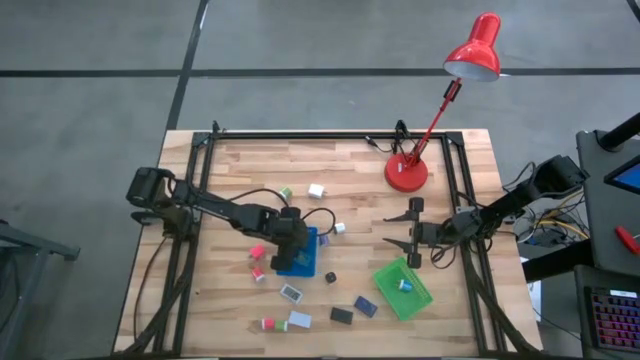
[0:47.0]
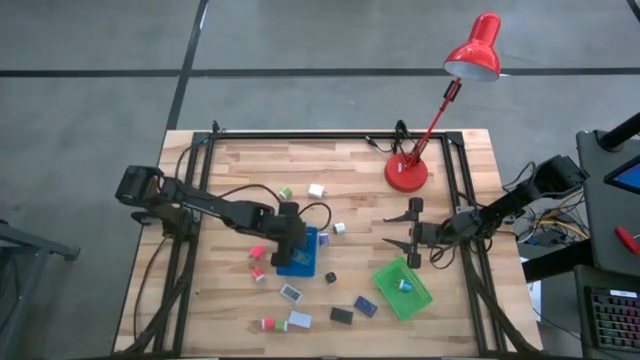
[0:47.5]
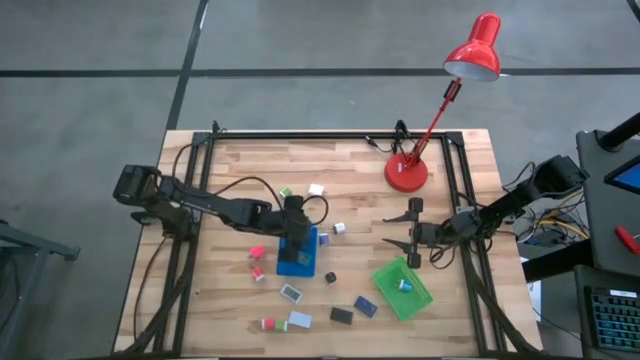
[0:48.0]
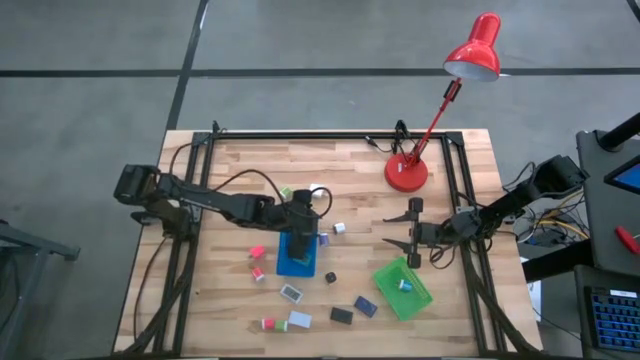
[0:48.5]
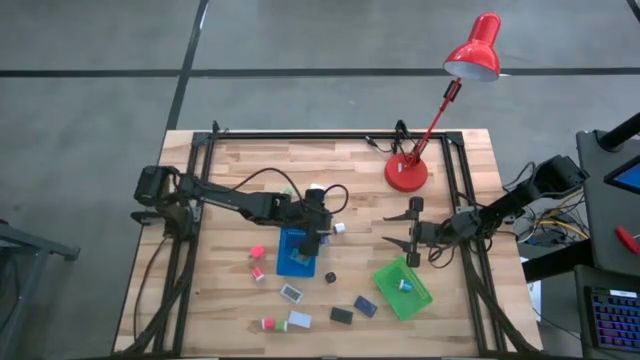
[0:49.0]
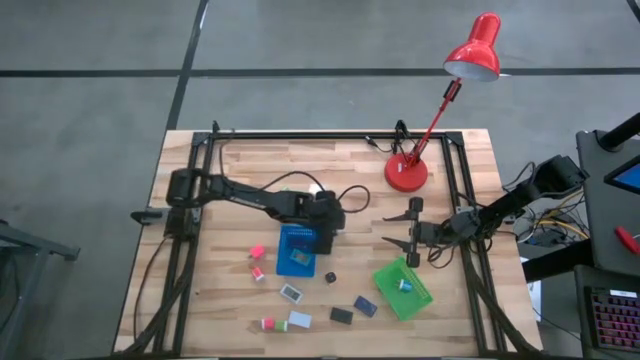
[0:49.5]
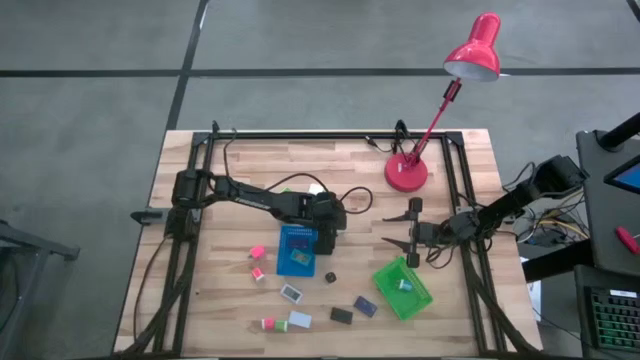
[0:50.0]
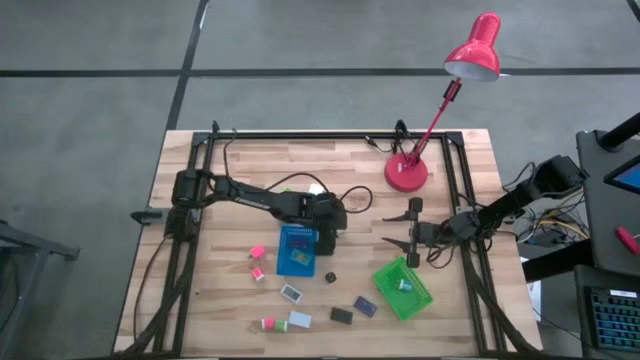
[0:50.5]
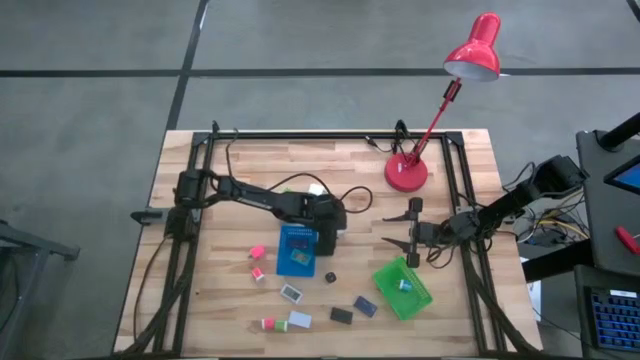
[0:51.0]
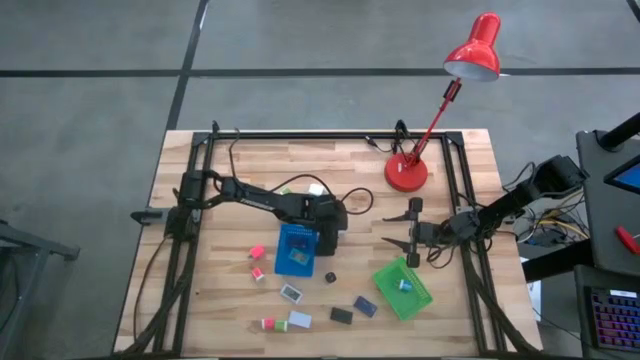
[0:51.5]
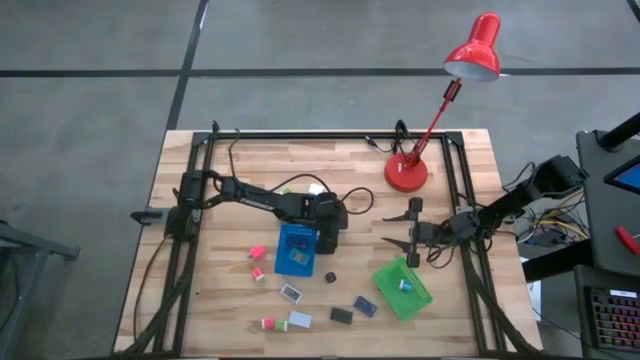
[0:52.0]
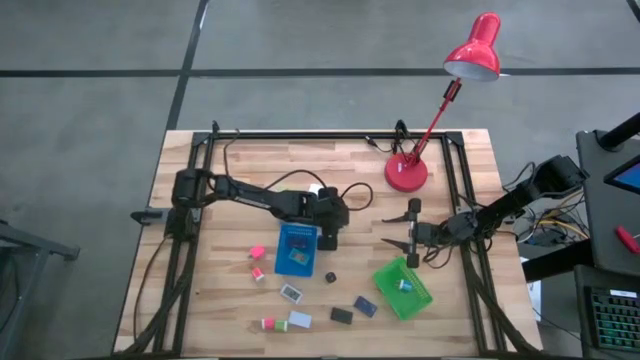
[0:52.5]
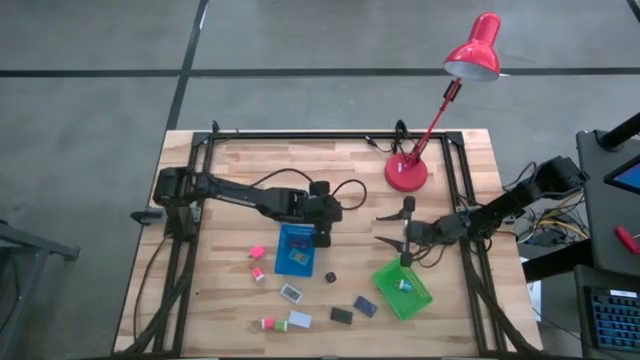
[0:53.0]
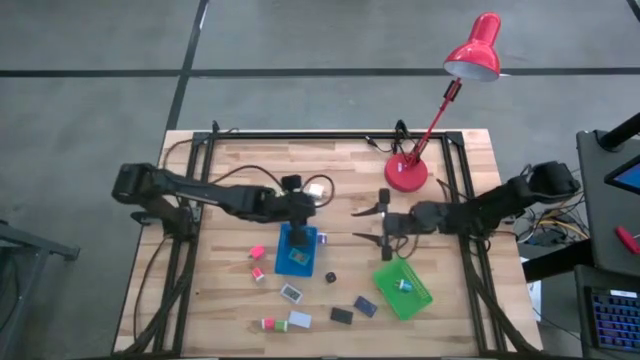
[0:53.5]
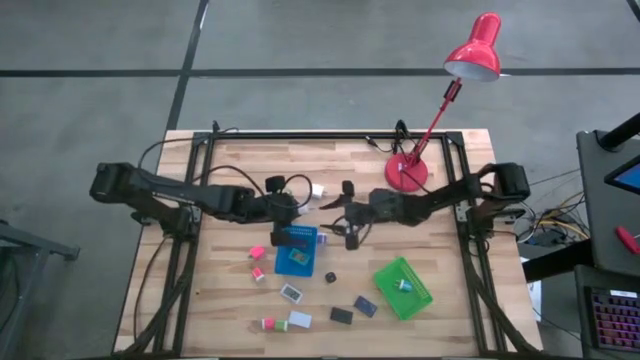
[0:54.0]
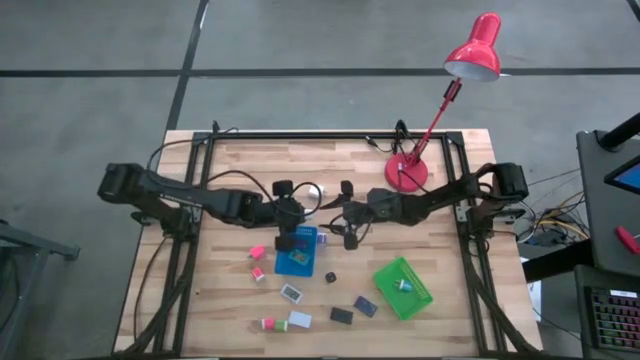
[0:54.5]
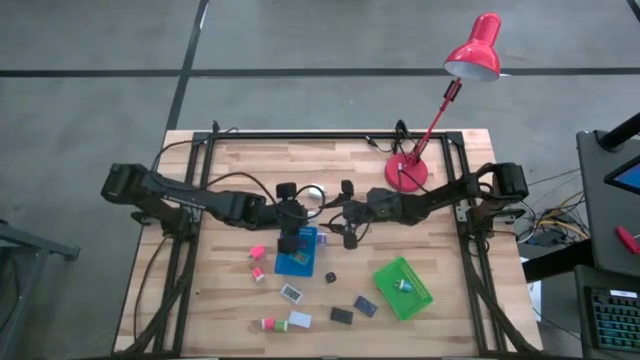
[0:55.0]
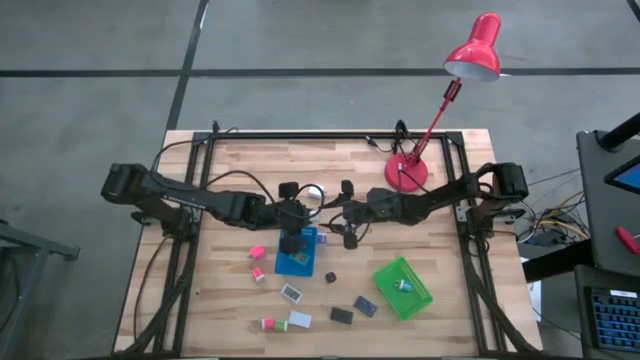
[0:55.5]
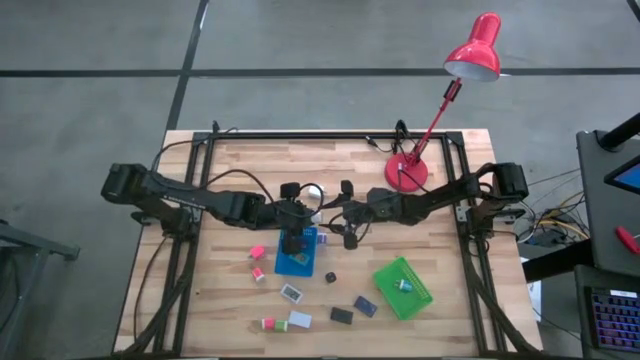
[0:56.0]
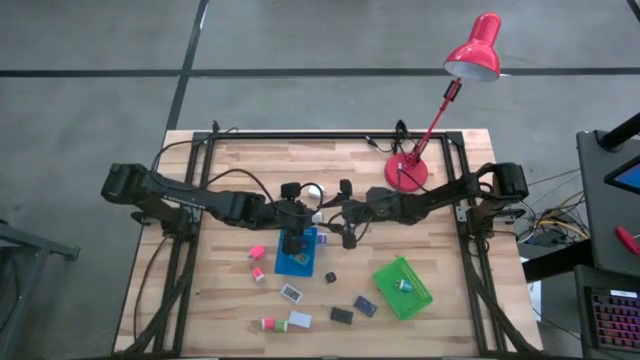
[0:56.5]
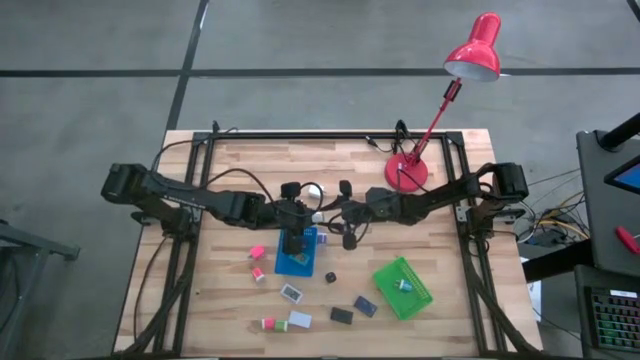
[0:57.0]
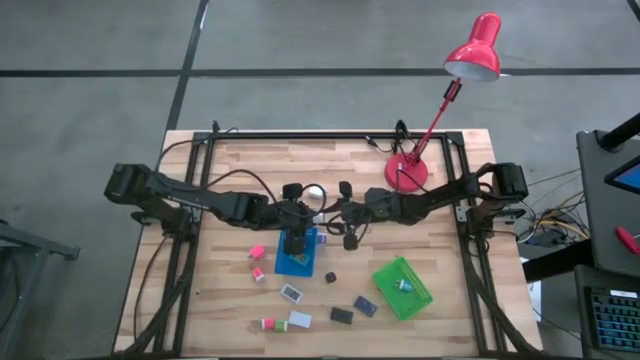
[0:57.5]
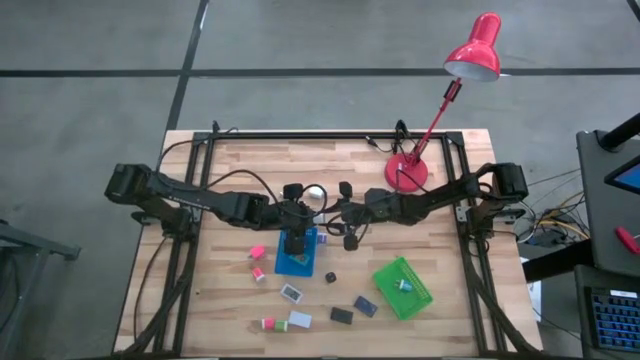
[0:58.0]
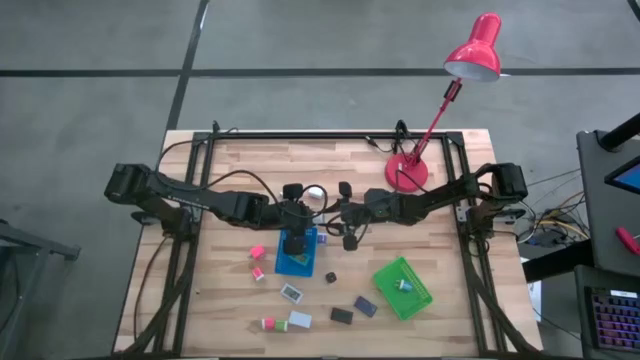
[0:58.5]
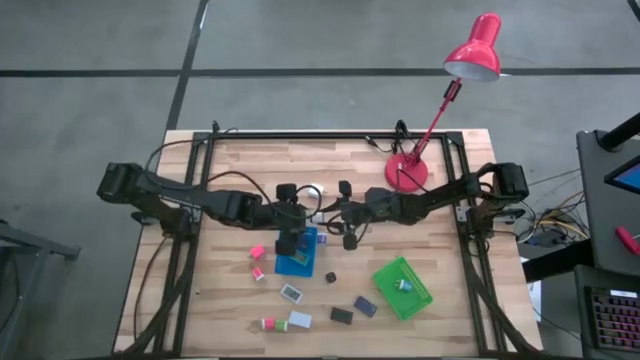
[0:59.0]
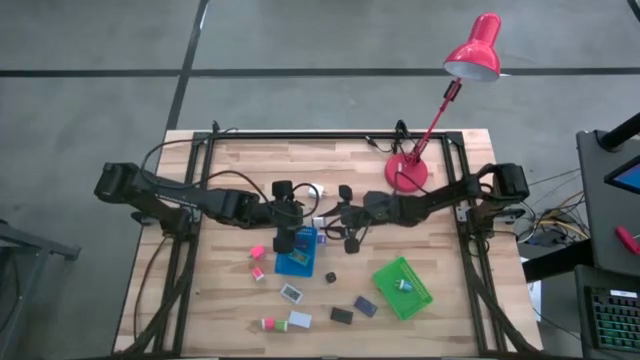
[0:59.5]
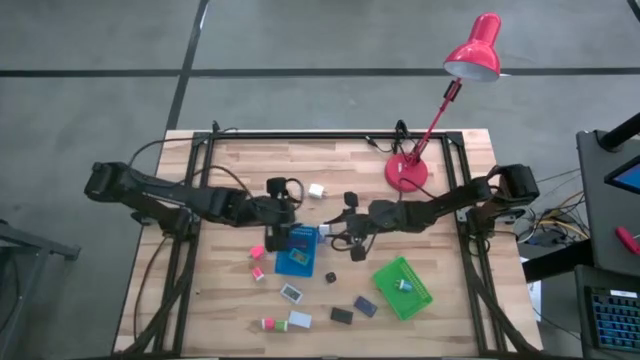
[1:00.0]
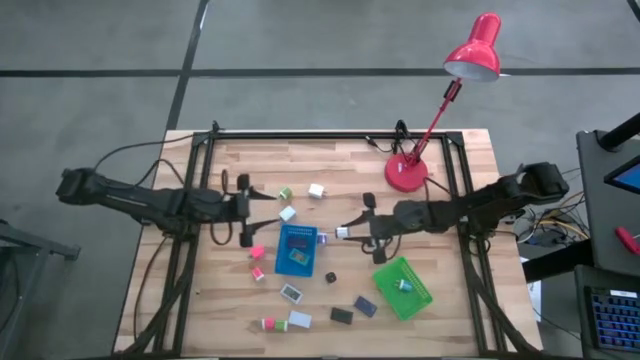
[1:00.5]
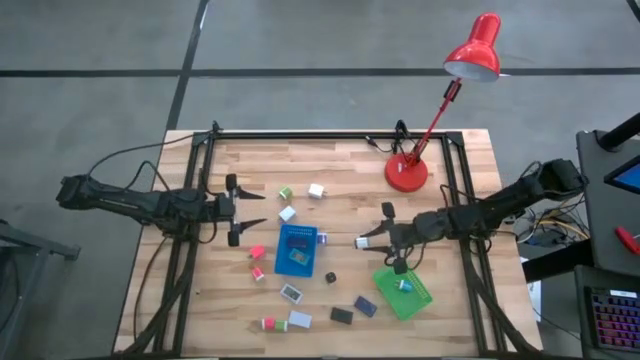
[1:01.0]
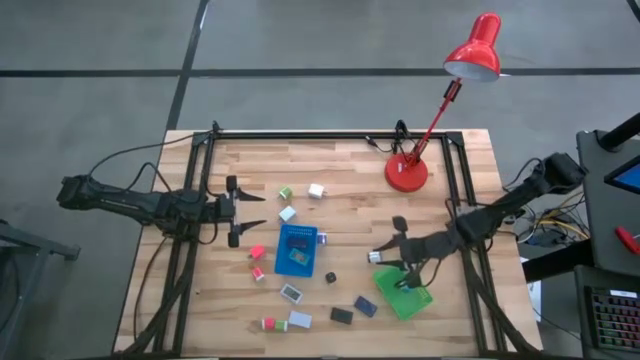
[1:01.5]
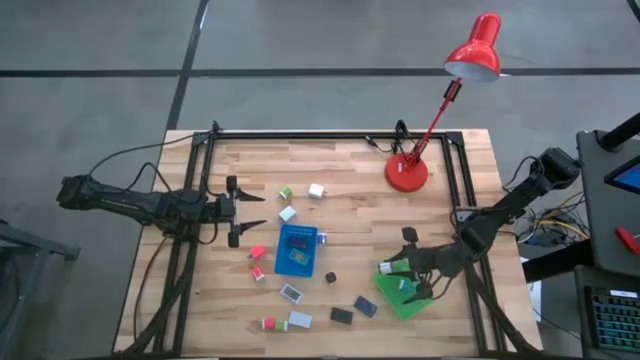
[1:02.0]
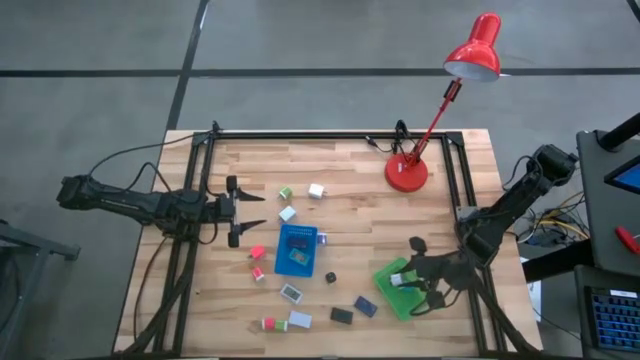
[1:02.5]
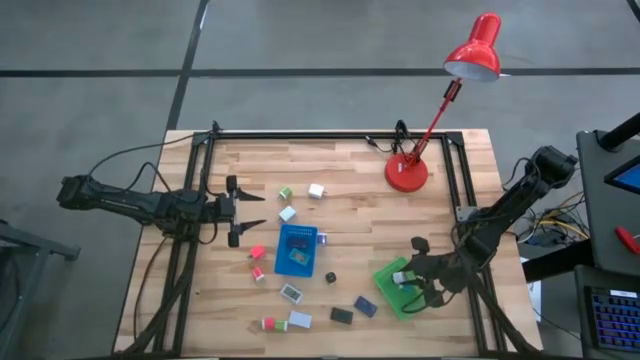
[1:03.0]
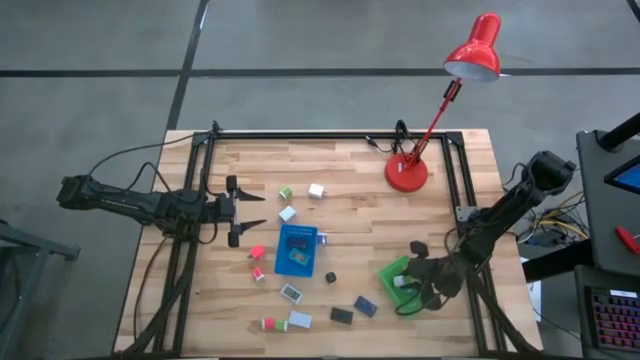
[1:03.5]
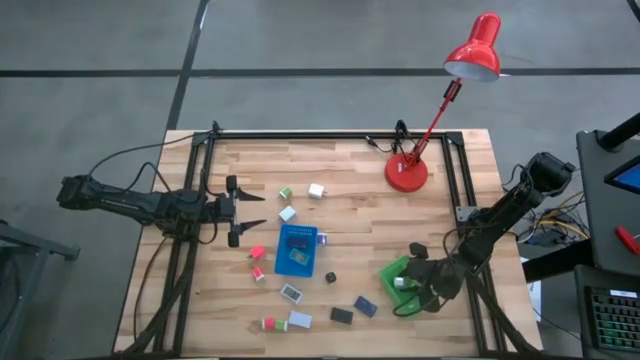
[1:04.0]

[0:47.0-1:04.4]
Task: Pick & Place Office items
Put the top white black charger adapter into the green bin
